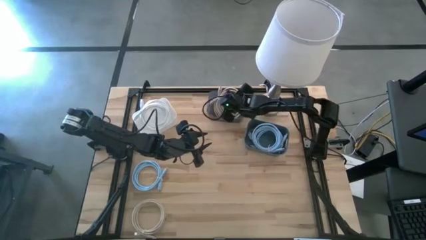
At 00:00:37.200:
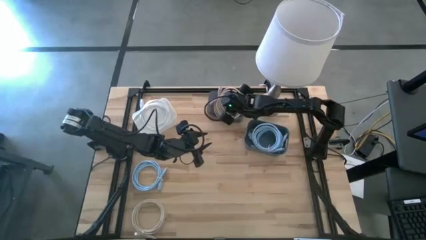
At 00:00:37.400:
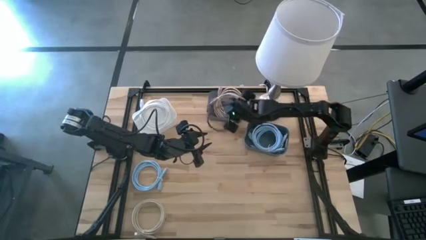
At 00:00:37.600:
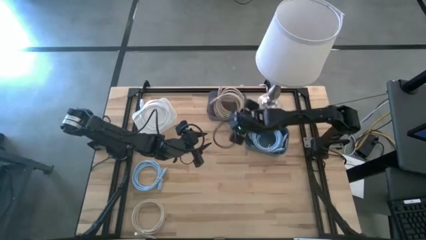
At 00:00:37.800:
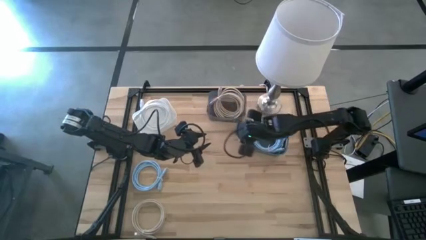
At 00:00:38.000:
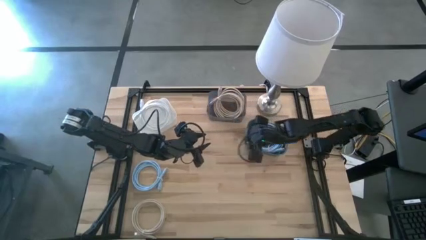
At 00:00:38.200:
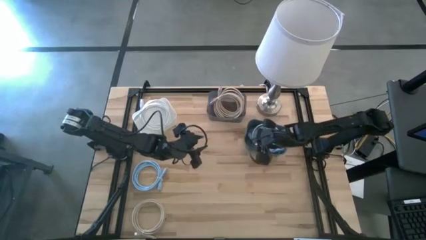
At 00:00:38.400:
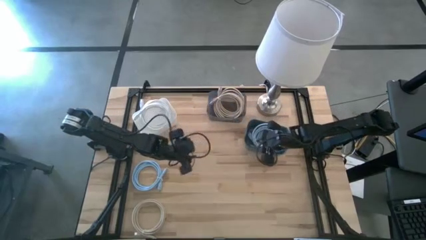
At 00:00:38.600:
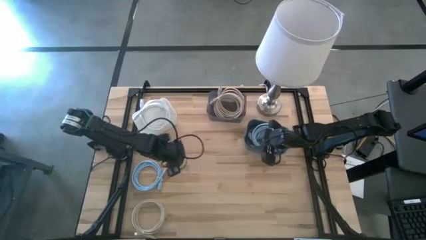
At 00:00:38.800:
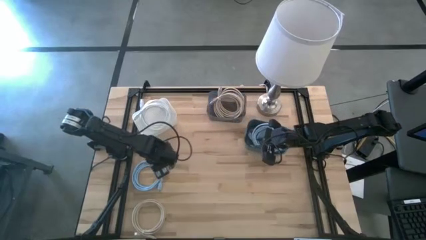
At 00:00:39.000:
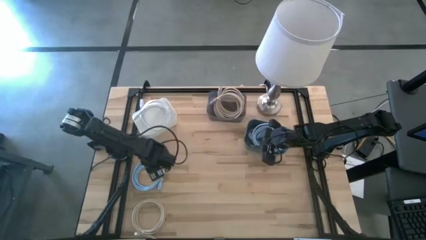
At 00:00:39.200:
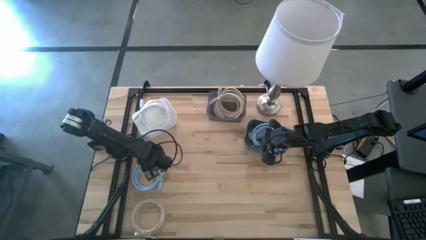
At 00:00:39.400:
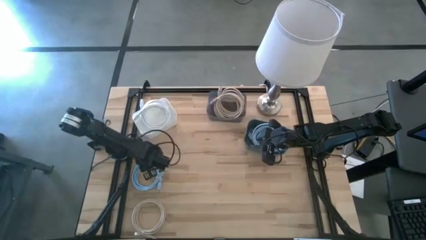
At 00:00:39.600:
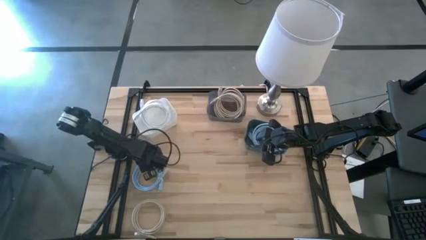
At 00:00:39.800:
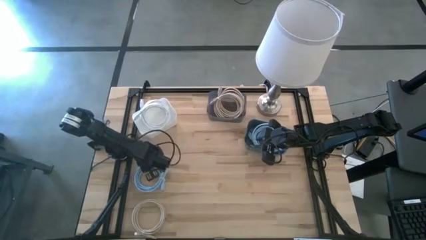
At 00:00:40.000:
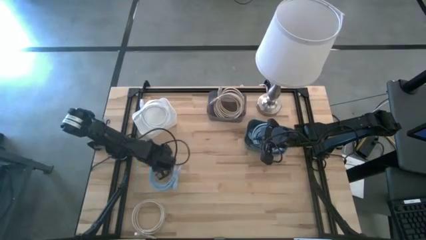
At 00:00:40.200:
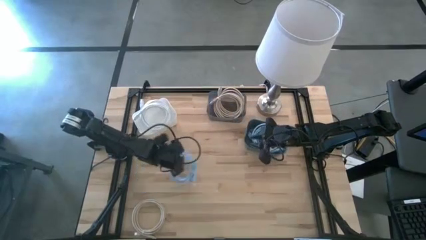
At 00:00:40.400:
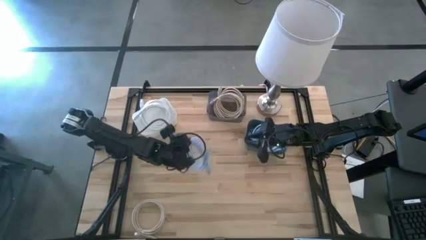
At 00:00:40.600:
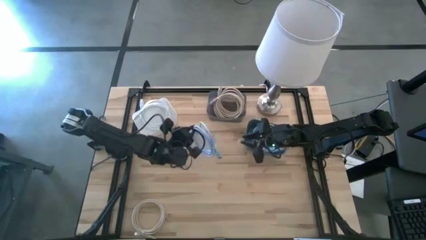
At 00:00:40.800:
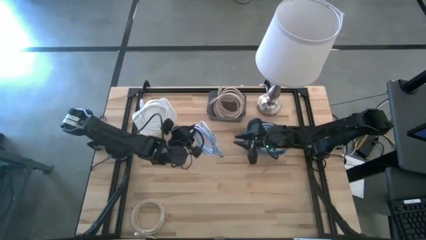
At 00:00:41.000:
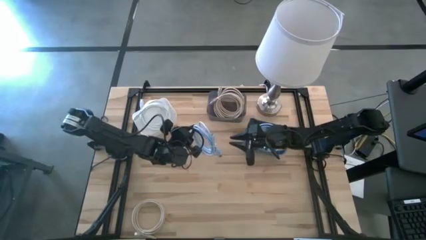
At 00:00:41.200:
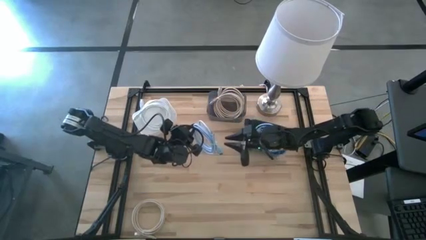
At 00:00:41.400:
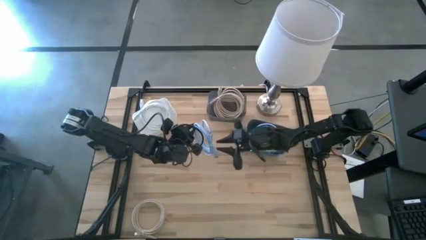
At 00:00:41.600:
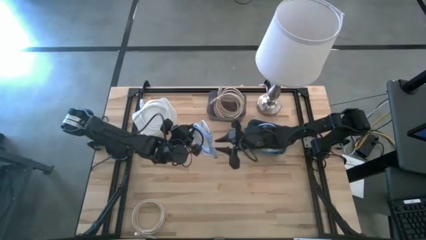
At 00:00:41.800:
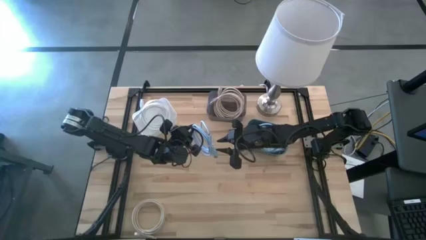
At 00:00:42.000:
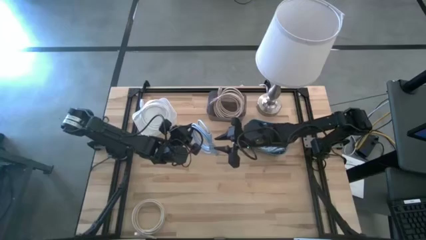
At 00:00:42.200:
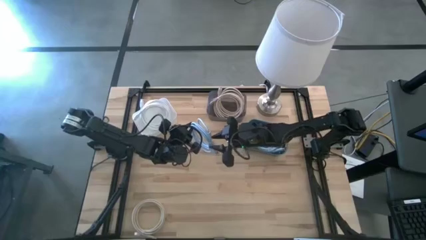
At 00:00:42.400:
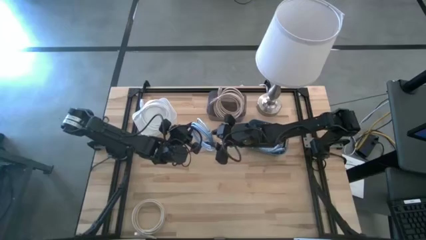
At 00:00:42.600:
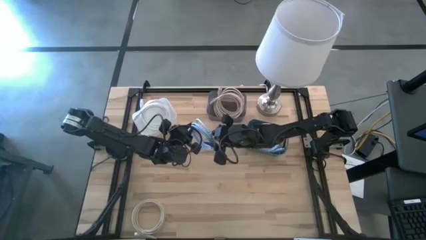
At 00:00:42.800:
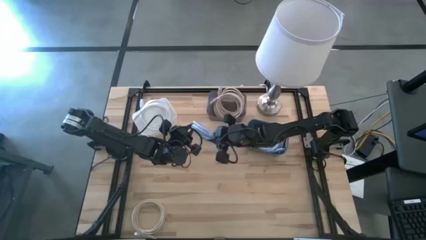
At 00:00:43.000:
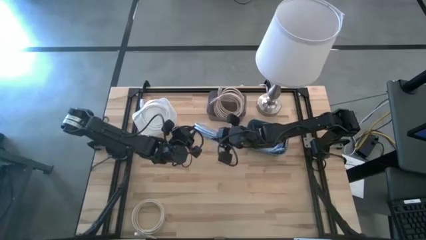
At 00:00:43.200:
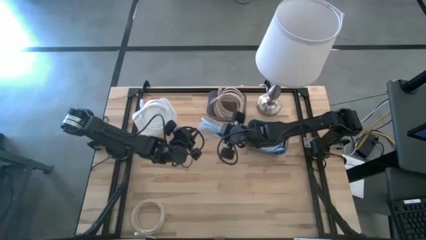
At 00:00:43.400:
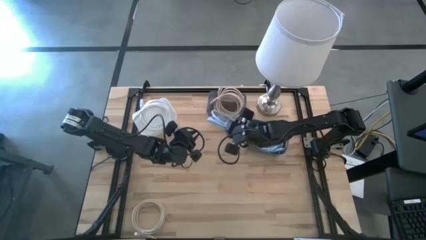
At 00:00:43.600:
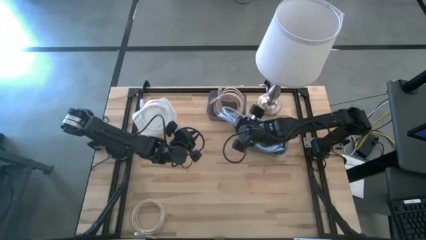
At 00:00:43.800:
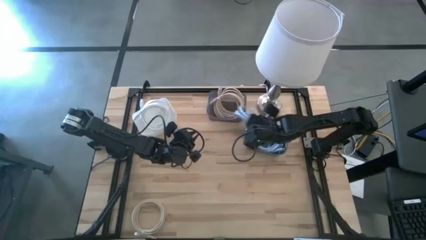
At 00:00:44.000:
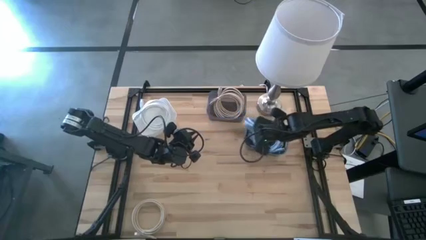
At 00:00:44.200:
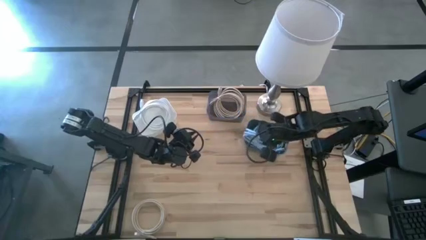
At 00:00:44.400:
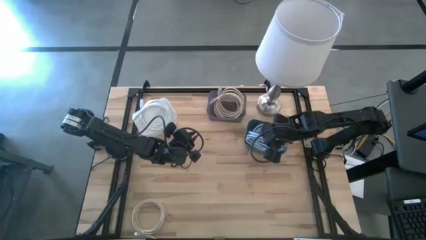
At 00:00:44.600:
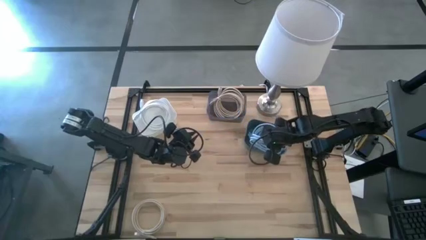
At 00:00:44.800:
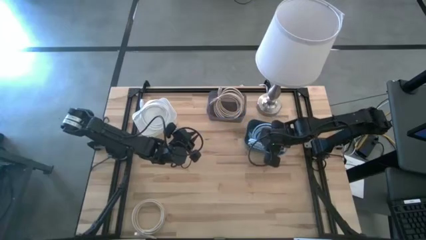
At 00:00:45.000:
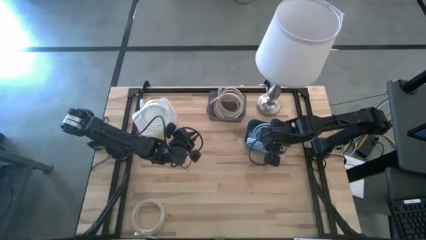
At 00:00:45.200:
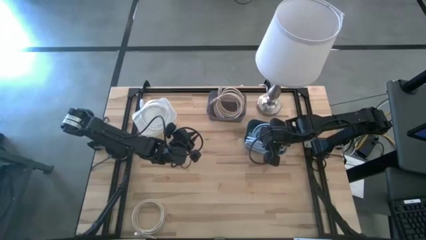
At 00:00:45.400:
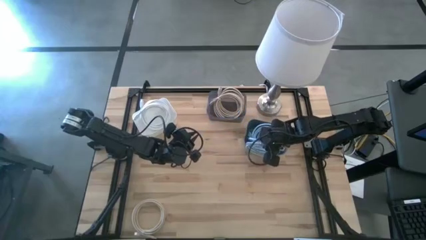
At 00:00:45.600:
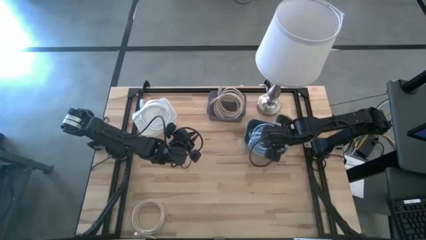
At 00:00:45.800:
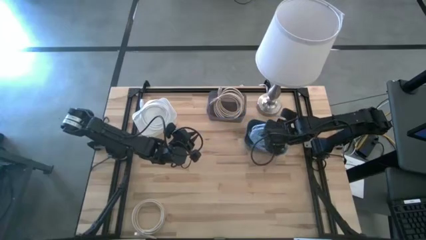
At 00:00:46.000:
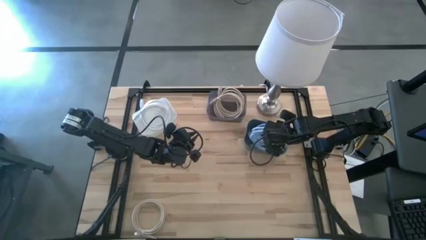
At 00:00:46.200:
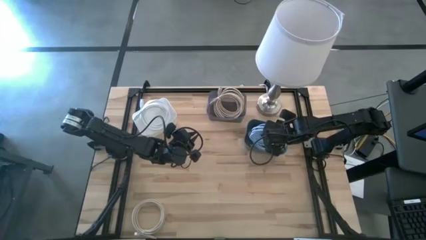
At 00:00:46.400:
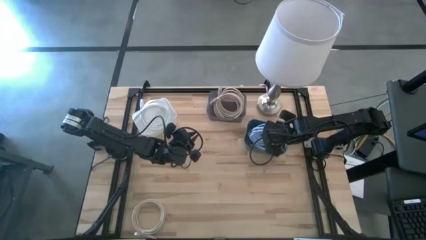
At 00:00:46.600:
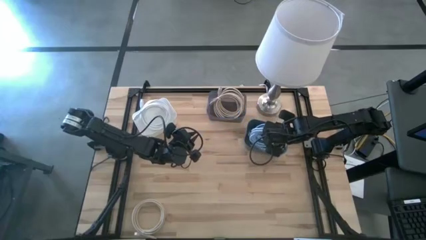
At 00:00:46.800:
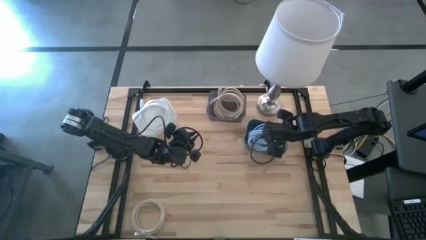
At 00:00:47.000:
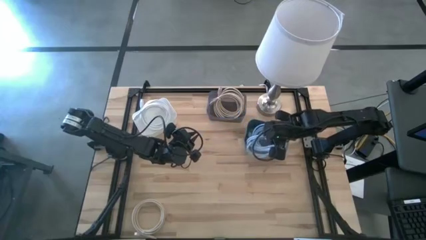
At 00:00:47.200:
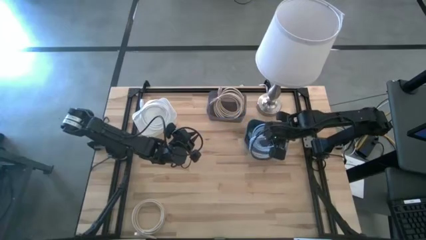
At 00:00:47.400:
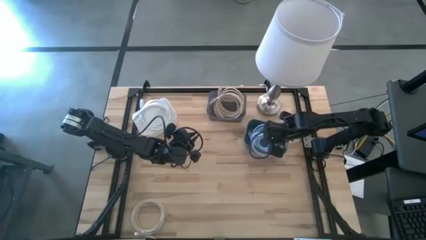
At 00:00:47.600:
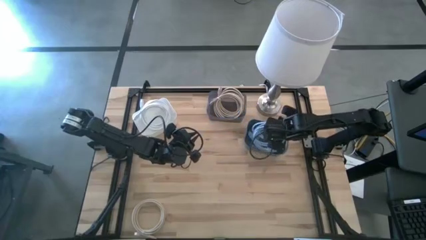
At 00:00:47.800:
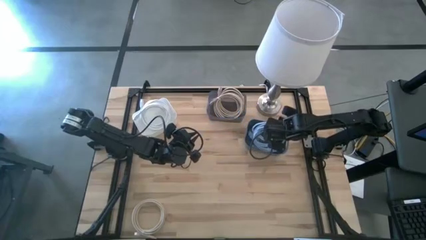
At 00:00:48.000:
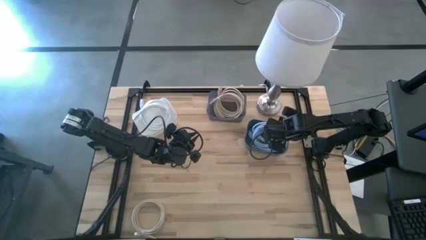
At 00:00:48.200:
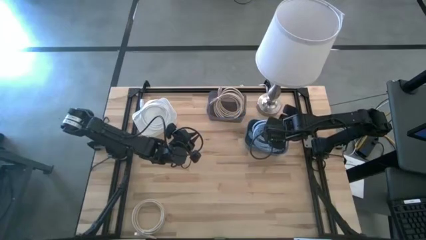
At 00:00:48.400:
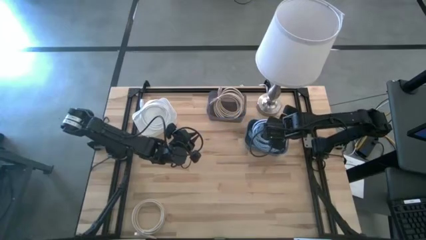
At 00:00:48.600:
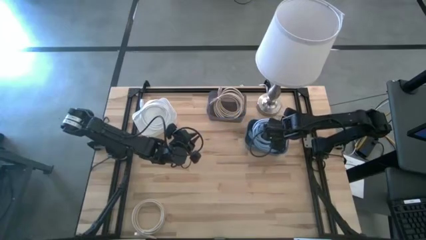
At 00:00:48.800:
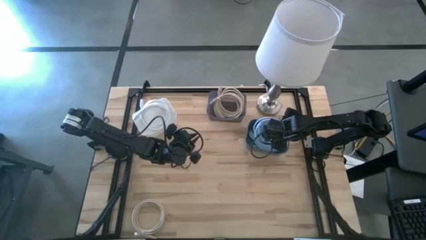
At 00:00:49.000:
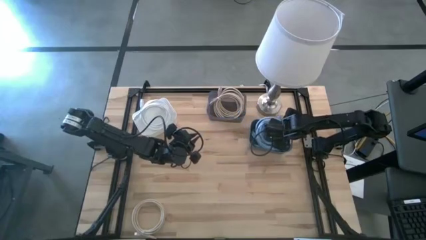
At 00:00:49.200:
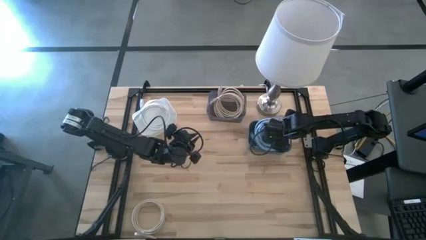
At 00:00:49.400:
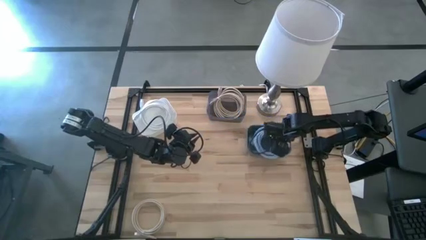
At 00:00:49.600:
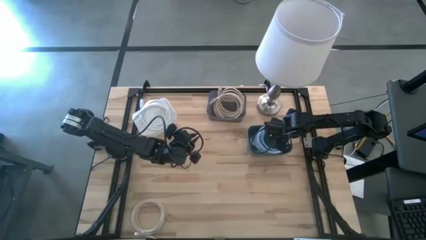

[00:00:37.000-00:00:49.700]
Task: Pick & Place USB Port
Put the blue charger cable into the blue bin

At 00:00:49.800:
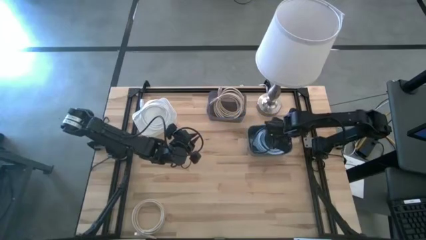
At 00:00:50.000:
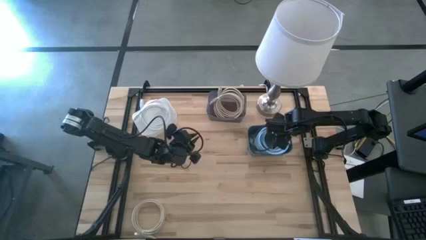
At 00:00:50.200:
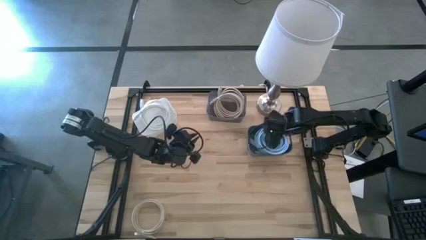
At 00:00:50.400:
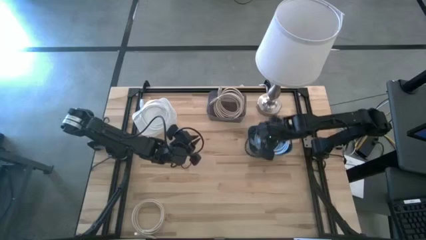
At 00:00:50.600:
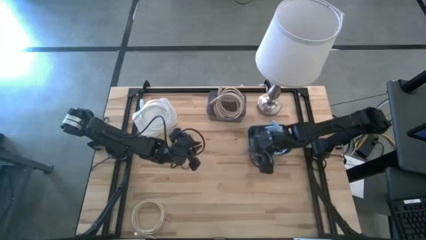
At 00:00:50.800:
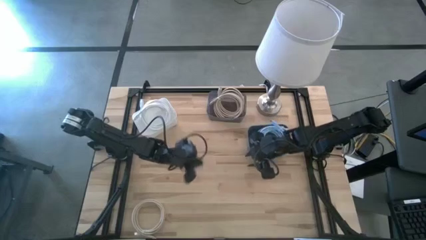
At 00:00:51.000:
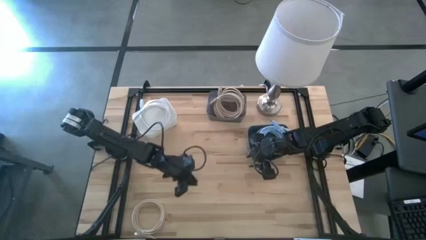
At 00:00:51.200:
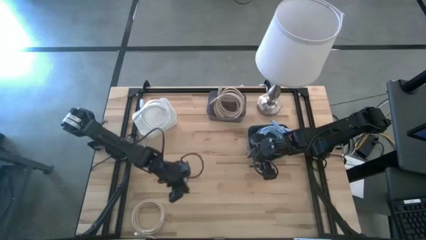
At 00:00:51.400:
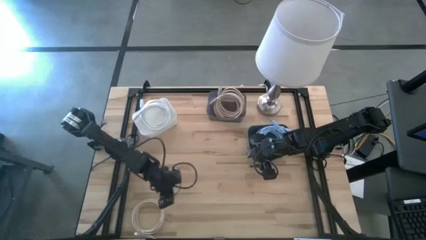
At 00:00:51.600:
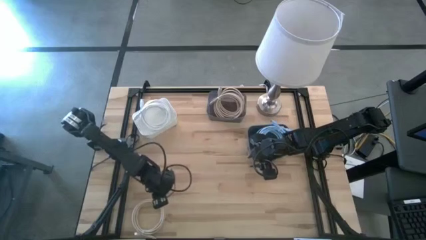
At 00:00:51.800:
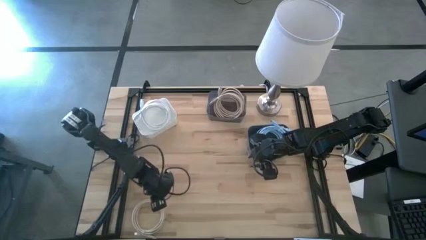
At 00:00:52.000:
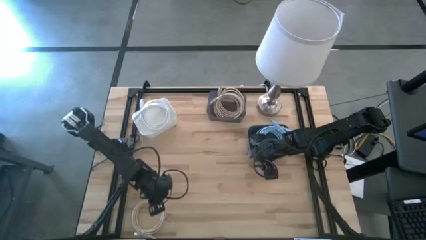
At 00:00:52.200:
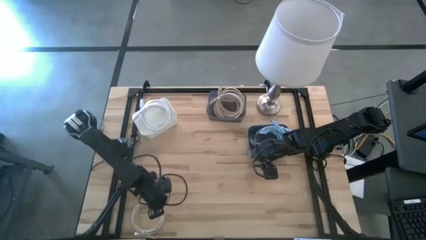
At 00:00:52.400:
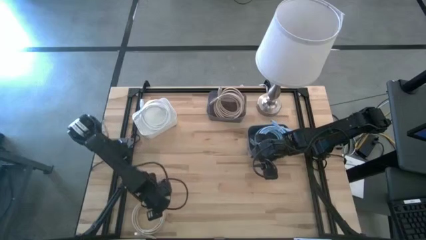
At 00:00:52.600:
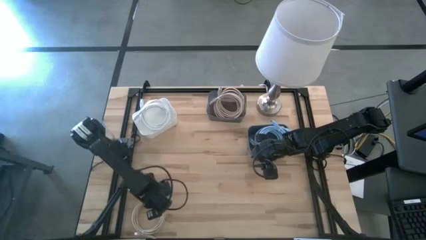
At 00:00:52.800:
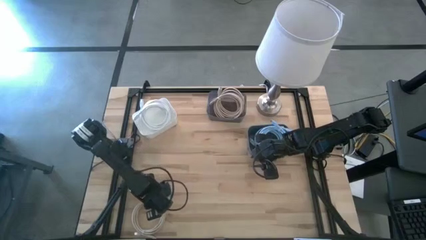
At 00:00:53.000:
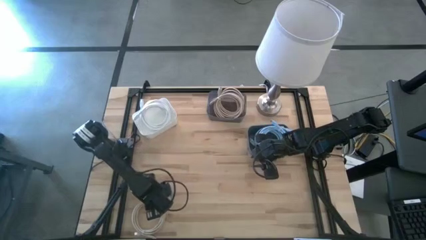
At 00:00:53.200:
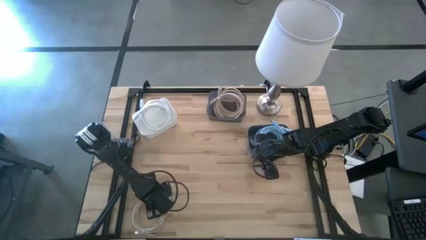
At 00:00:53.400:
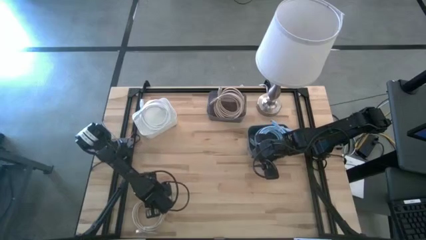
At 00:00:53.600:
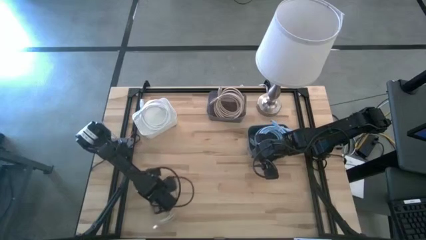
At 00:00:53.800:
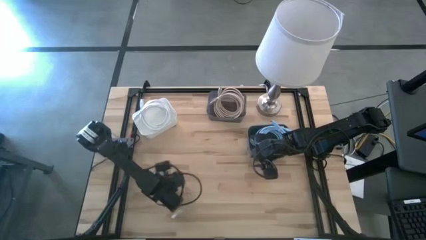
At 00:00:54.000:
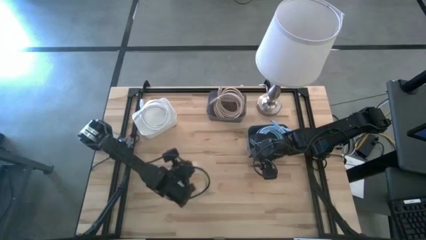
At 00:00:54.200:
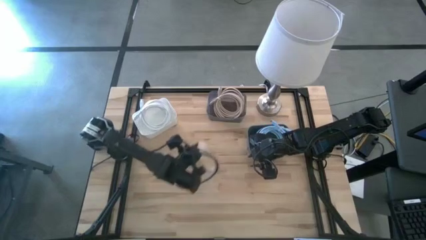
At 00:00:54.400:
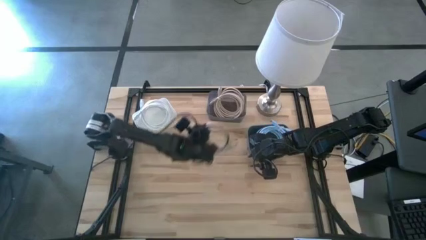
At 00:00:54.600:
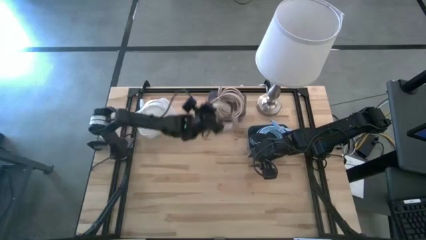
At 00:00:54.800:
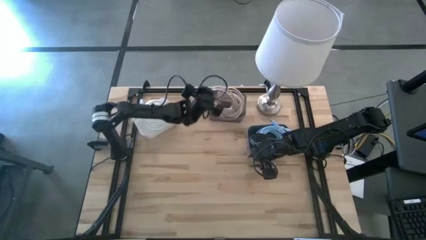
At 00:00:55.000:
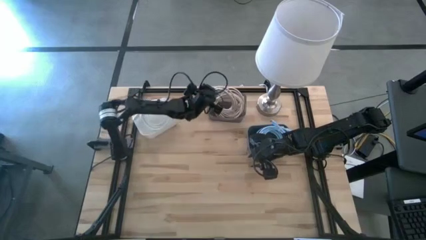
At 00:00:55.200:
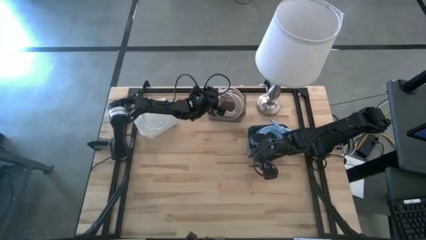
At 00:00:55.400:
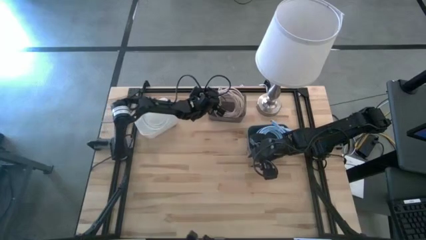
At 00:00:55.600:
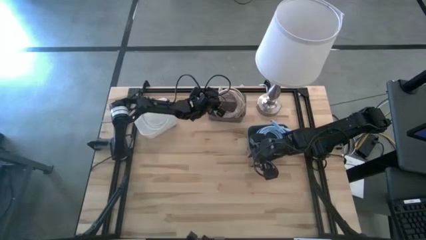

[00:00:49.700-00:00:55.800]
Put the brown charger cable into the black bin
